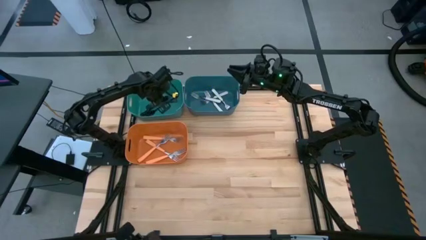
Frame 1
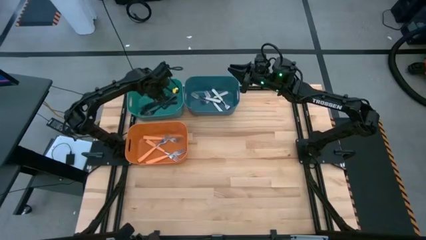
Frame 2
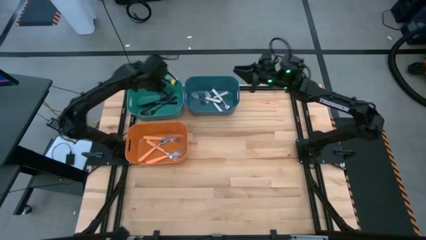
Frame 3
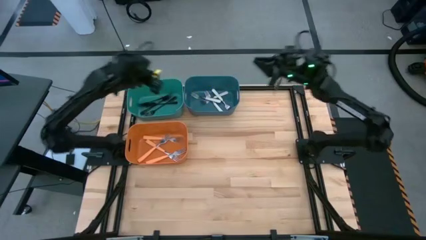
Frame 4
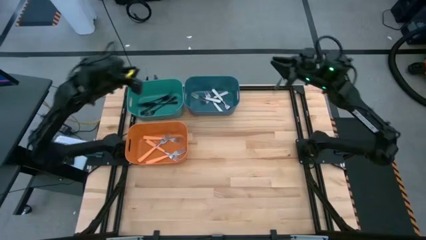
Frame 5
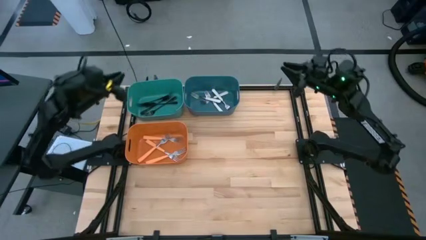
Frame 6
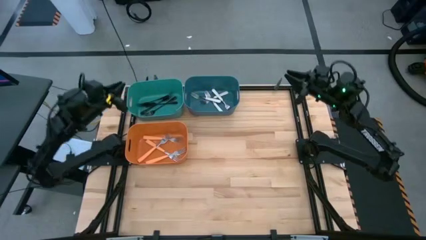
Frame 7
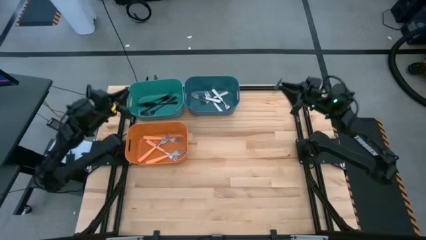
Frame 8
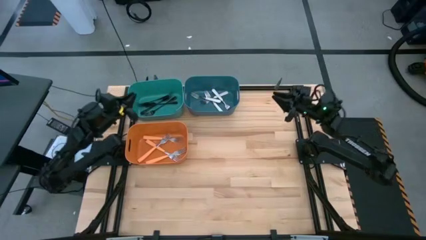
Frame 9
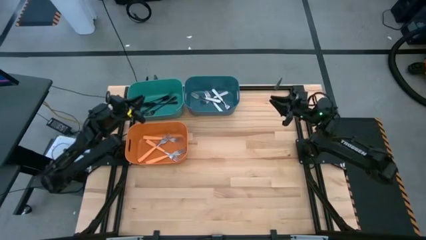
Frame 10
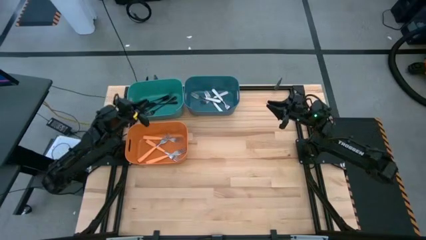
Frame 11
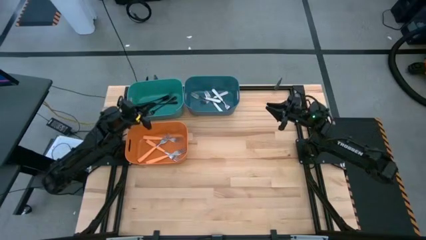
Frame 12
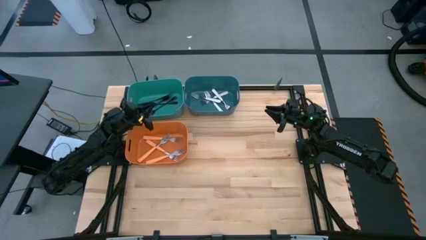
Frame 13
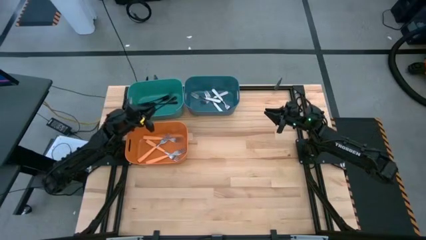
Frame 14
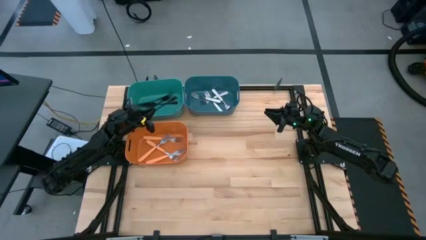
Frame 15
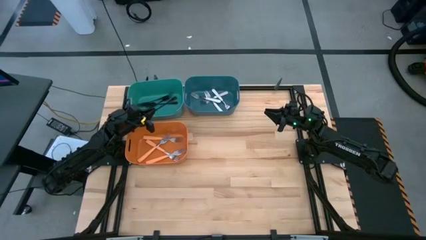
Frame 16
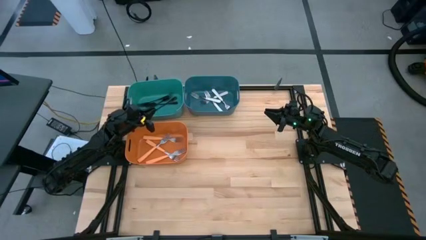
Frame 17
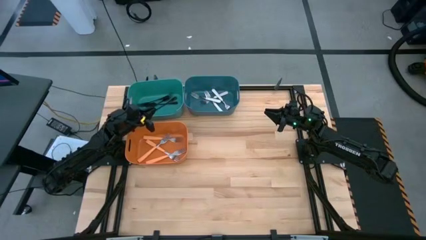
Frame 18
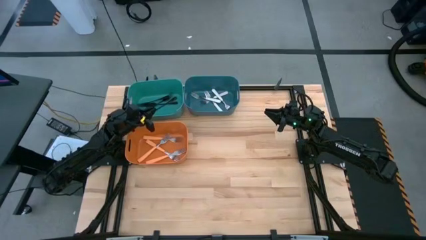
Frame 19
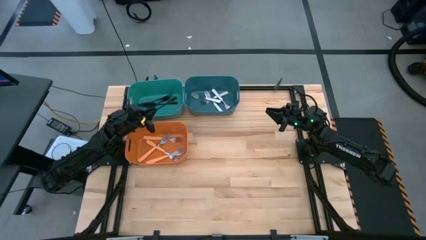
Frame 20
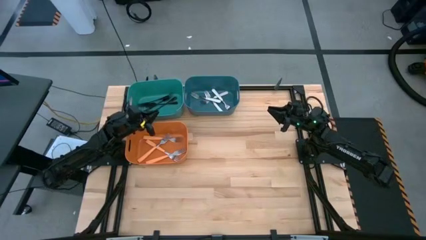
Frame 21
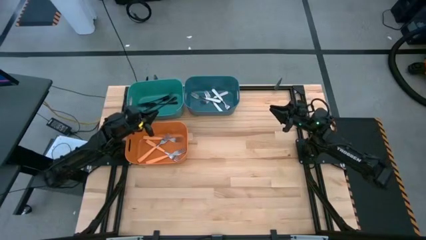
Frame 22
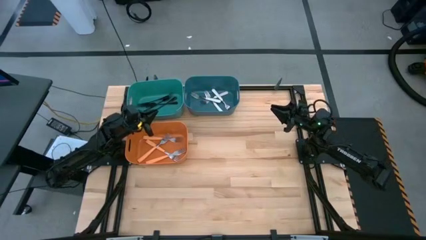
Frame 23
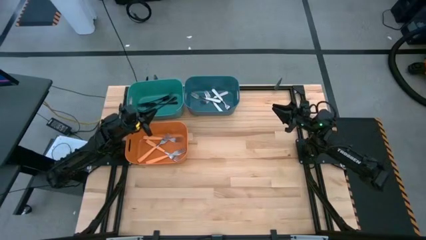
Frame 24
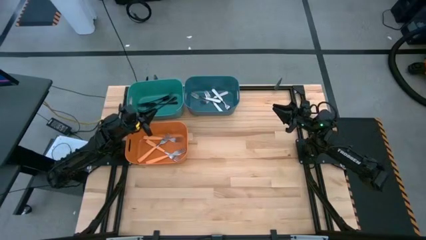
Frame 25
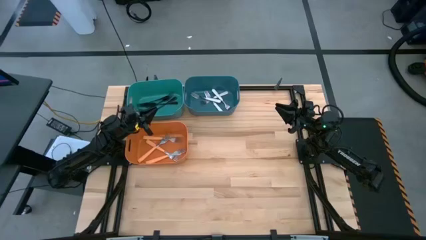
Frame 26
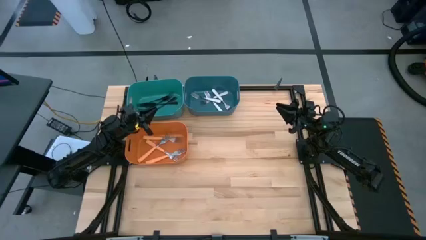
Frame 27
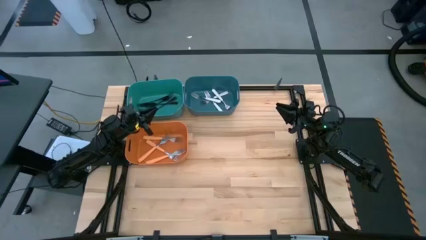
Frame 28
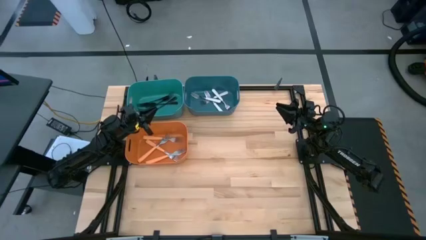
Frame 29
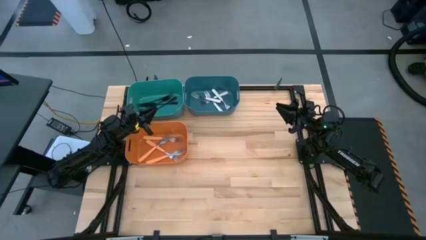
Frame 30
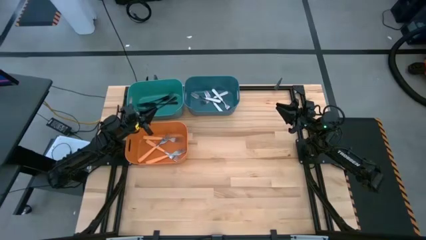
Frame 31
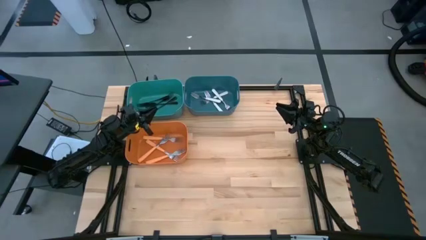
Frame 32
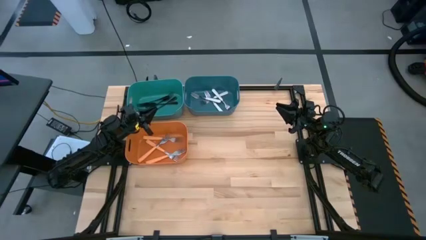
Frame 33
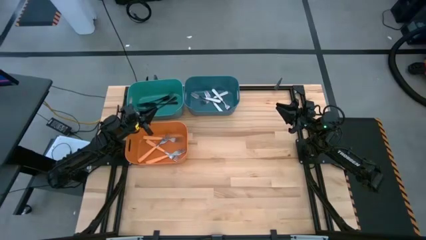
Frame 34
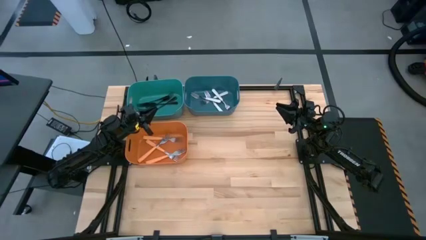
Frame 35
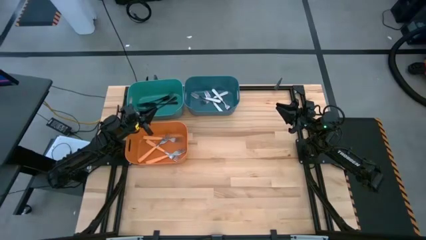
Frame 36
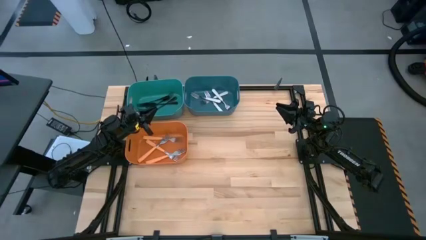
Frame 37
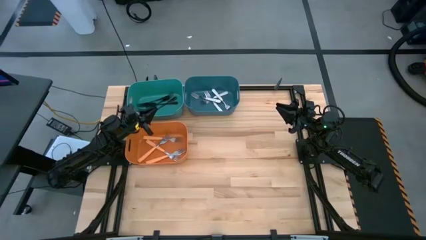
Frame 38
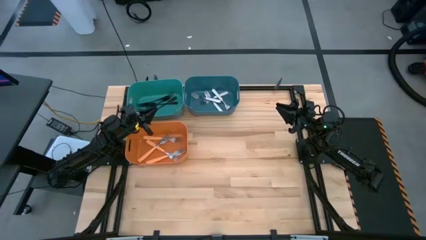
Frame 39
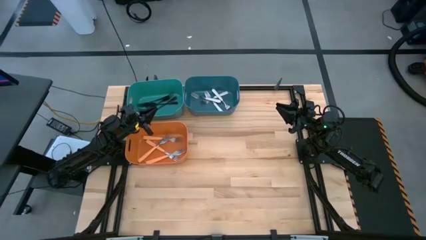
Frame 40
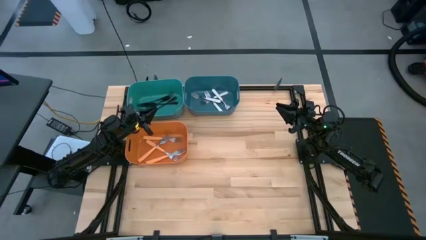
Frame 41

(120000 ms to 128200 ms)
Task: Sort silverware by color (type)
Return to Home Position

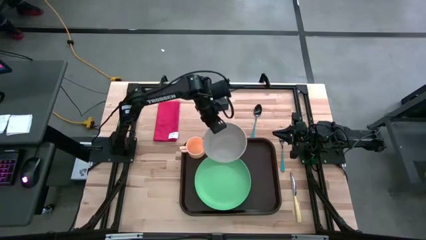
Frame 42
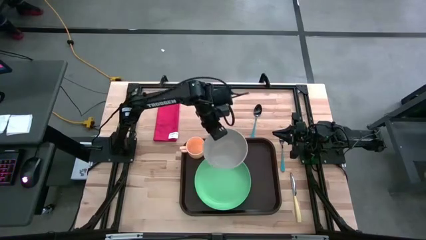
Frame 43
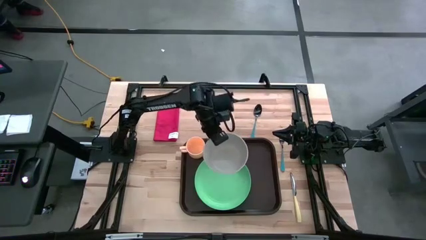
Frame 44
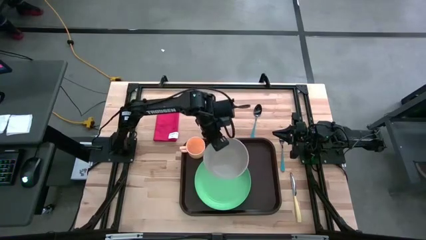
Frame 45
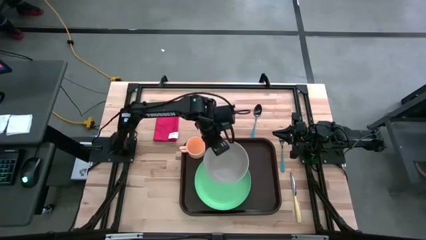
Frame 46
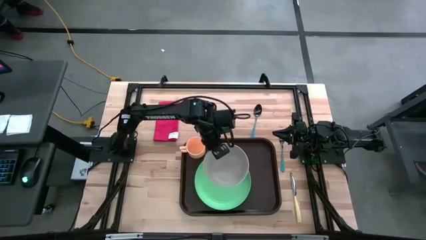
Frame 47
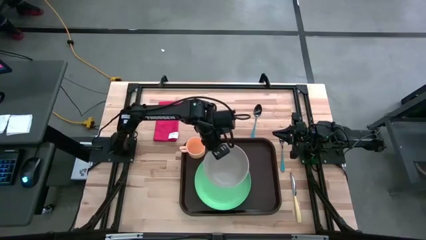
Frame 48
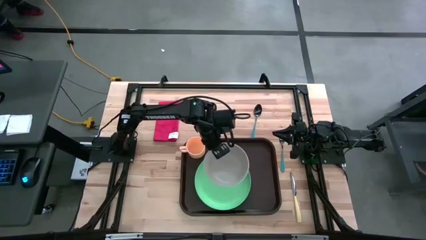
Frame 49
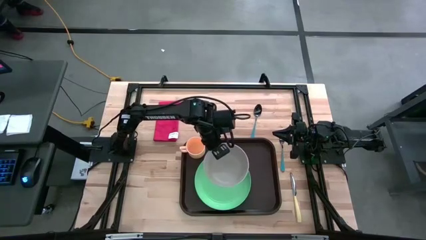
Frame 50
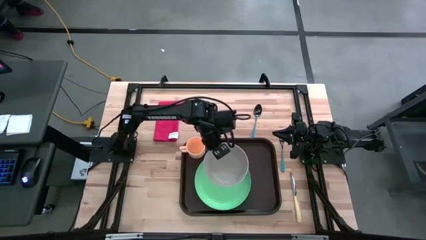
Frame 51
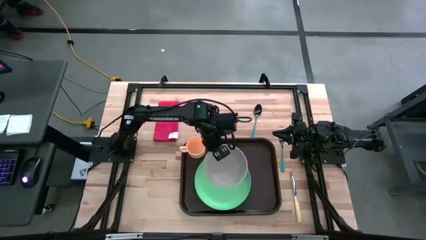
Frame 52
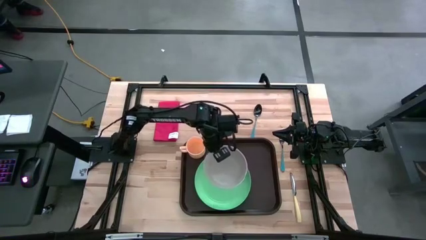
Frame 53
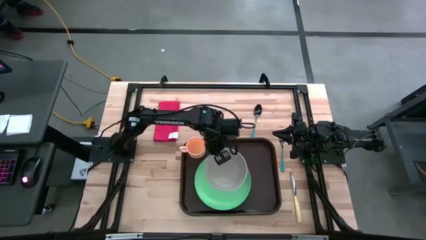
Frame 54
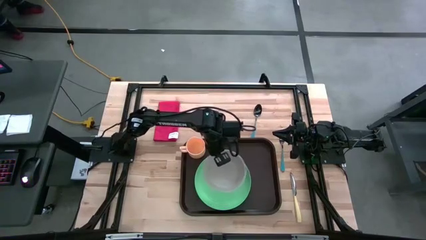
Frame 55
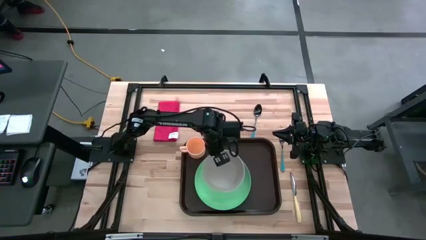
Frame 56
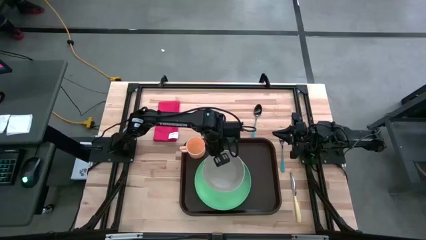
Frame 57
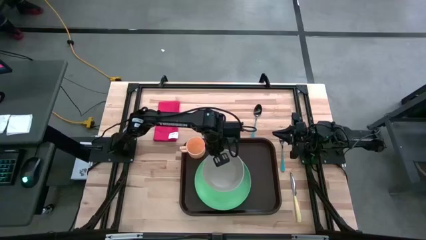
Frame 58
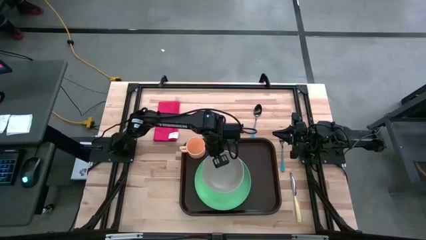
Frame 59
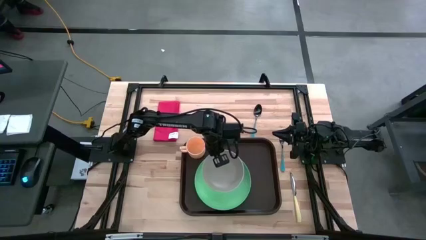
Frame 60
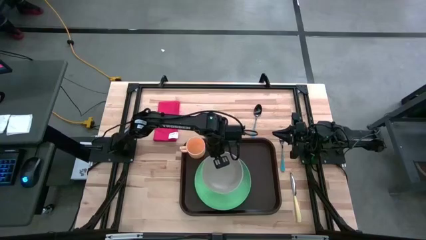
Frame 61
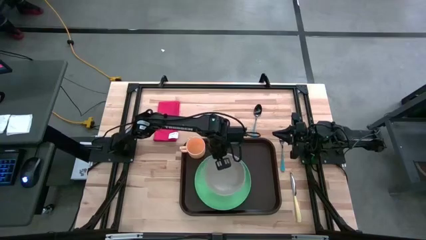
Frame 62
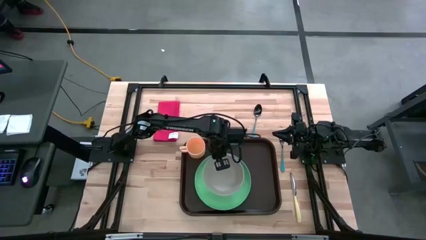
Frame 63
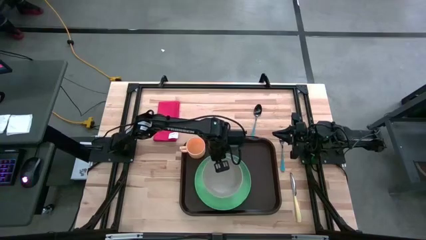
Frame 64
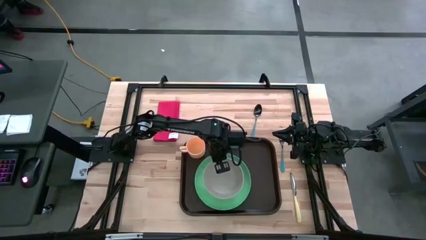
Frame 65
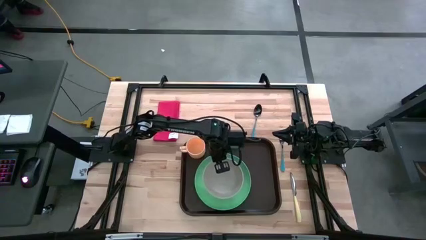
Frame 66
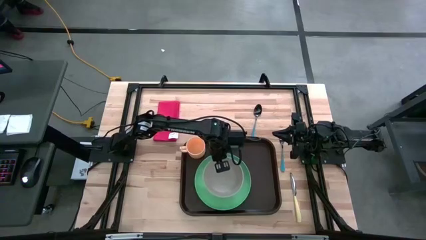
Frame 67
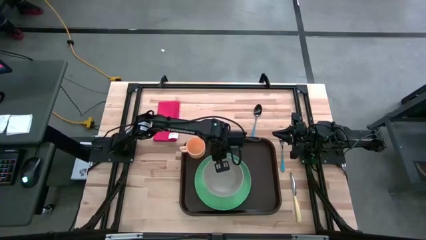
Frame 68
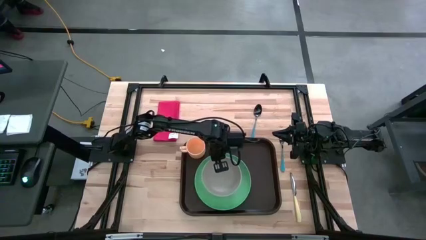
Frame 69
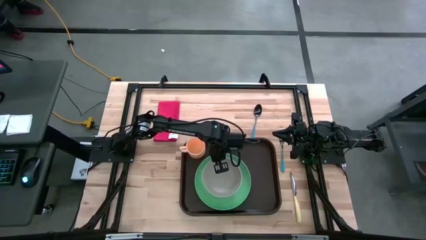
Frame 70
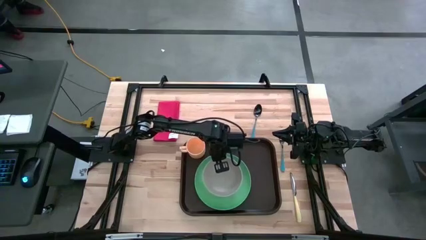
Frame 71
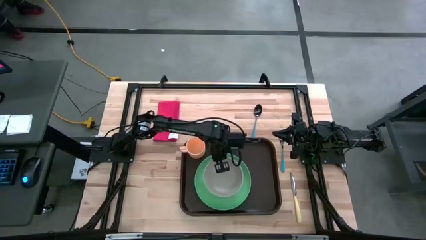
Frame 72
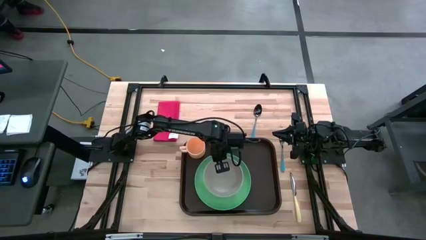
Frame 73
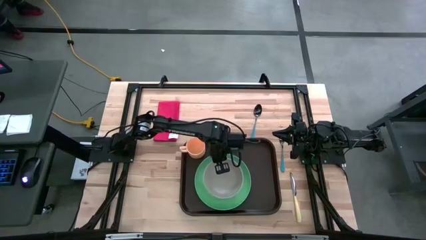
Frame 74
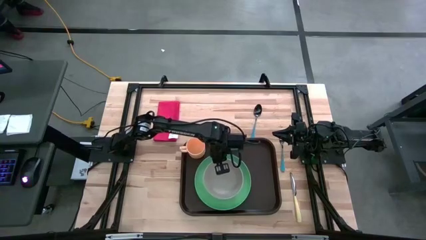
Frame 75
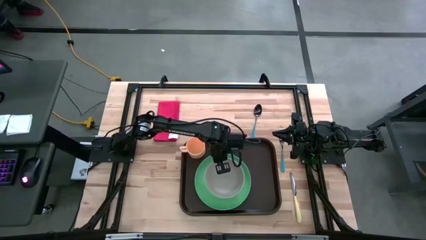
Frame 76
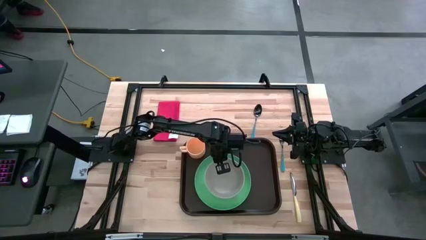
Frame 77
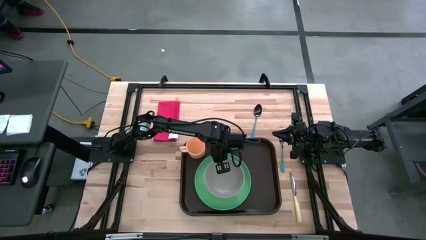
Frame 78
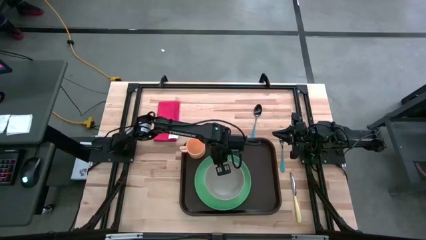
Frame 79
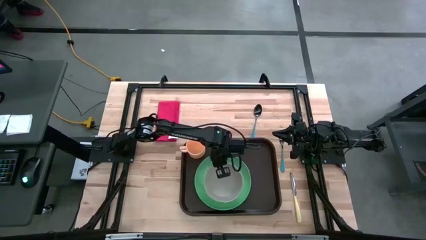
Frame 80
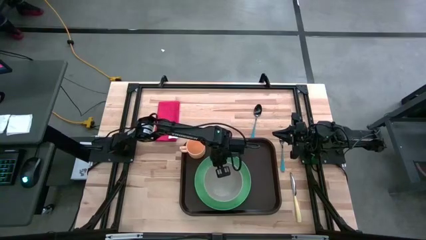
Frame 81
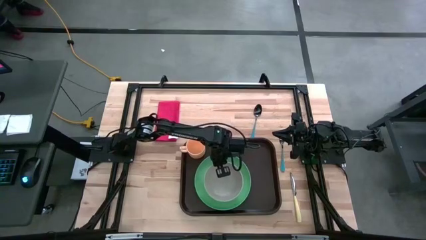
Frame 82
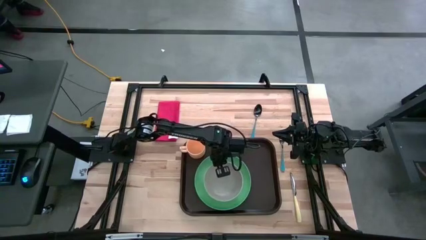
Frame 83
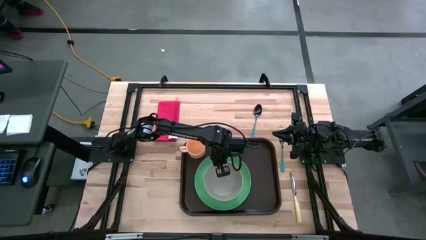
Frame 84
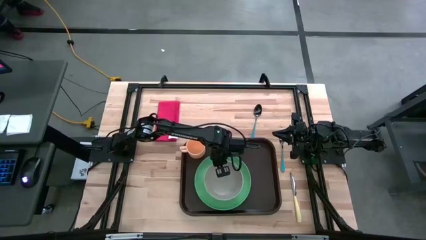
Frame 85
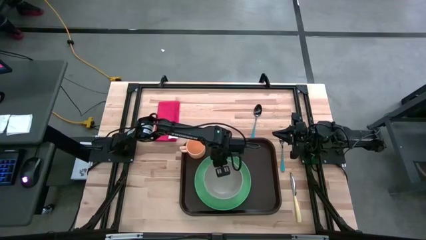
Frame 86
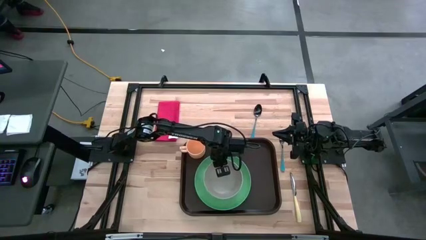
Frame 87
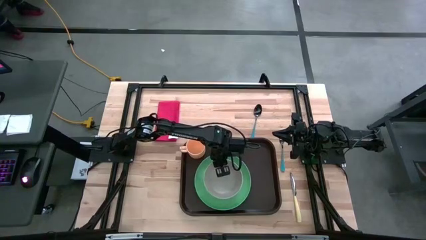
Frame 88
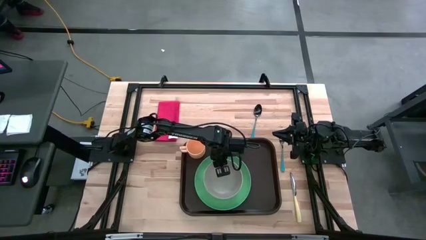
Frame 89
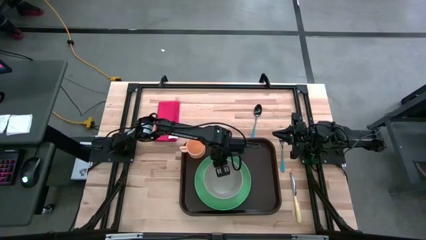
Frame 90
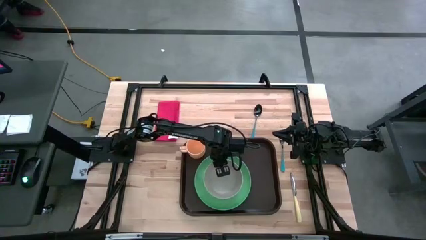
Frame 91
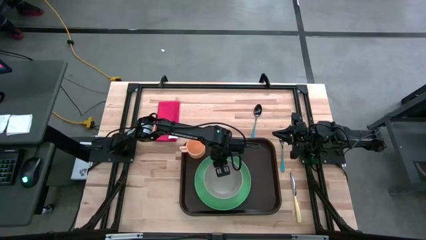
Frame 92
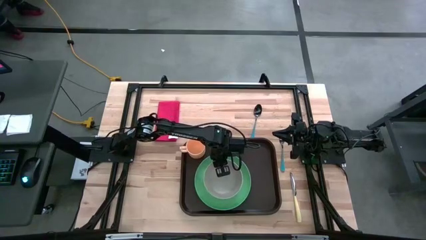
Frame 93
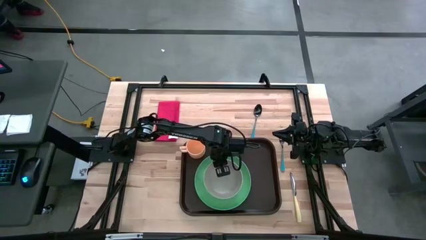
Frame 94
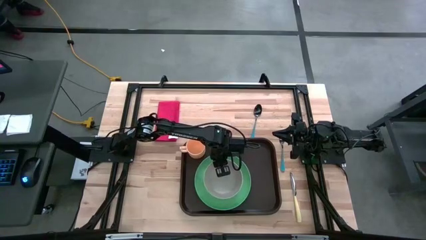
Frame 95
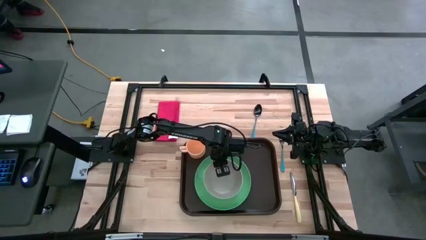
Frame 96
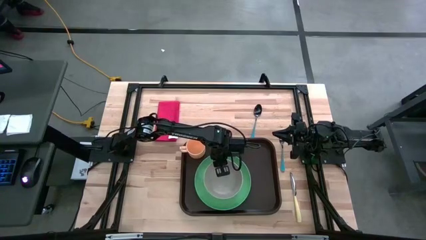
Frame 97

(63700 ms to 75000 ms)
Task: Set up tray
Put the gray bowl on top of the green plate on the brown serving tray
